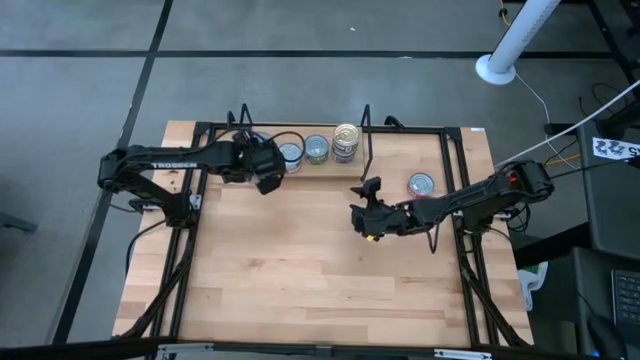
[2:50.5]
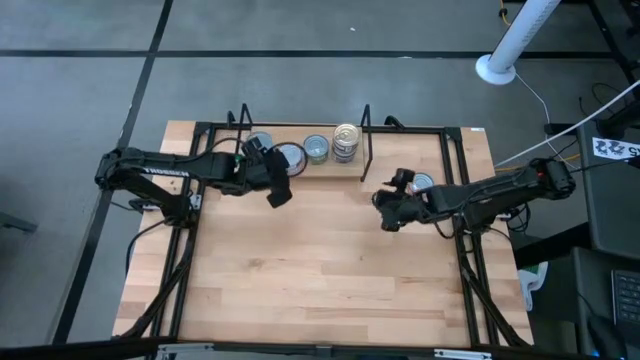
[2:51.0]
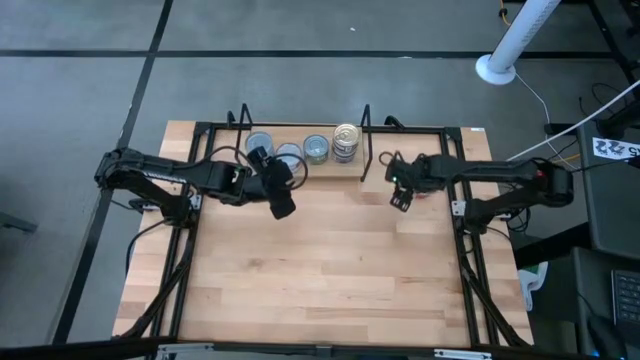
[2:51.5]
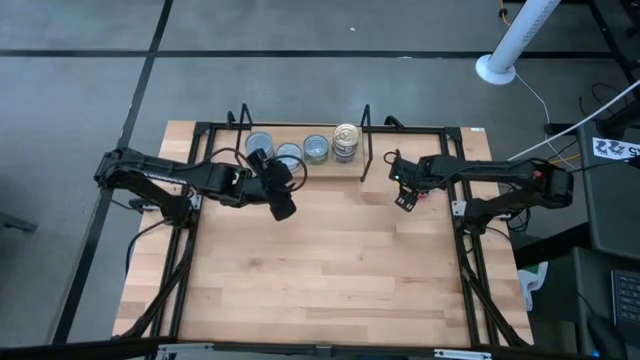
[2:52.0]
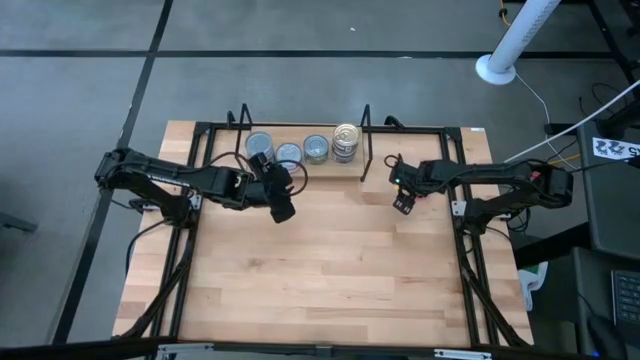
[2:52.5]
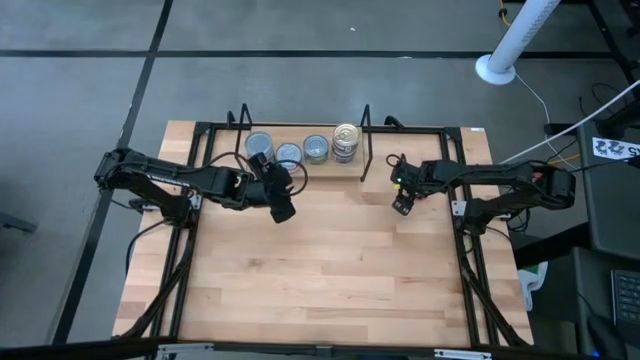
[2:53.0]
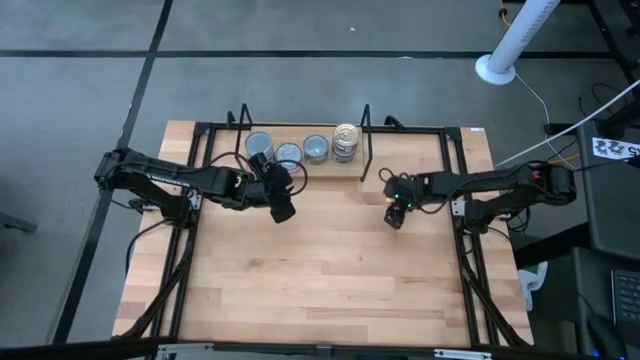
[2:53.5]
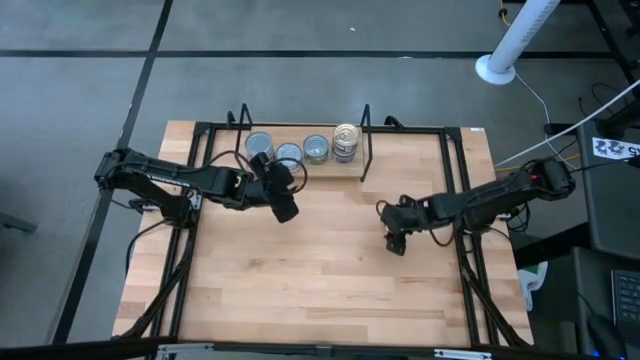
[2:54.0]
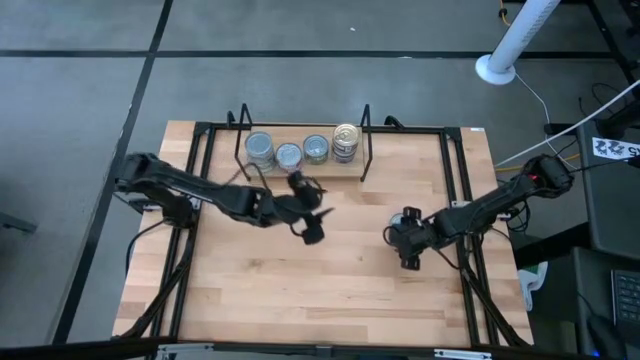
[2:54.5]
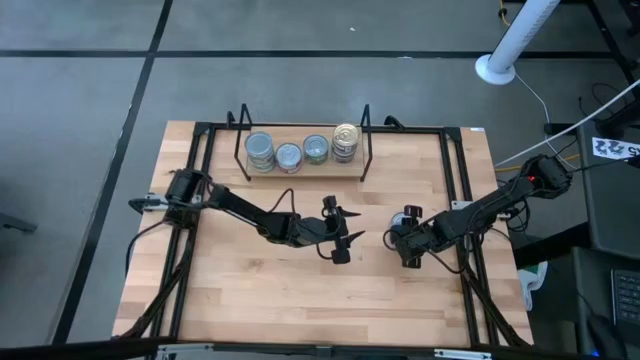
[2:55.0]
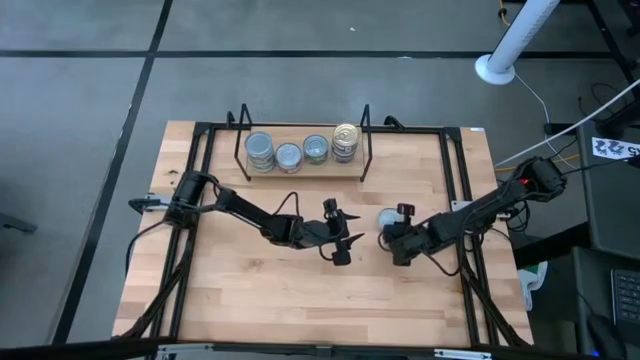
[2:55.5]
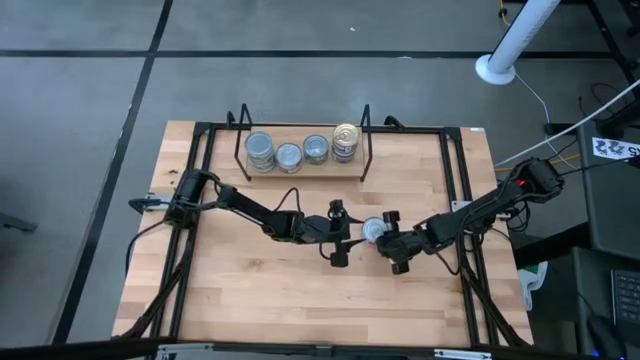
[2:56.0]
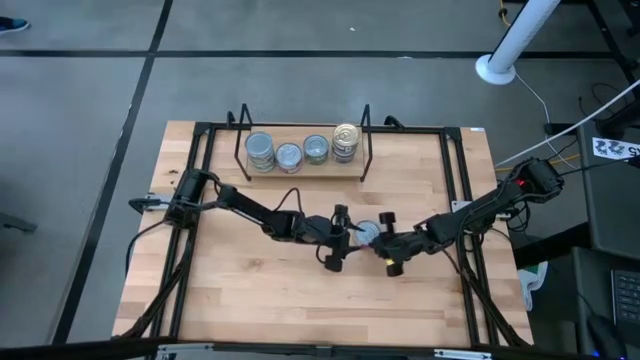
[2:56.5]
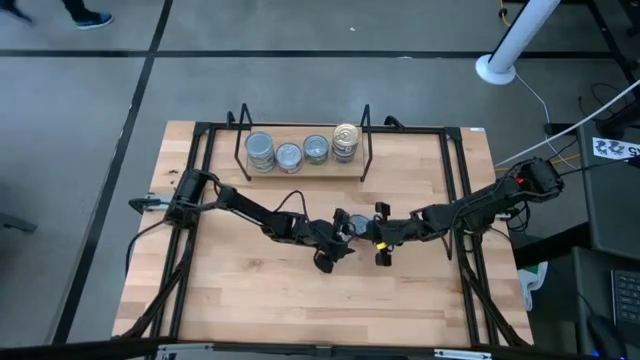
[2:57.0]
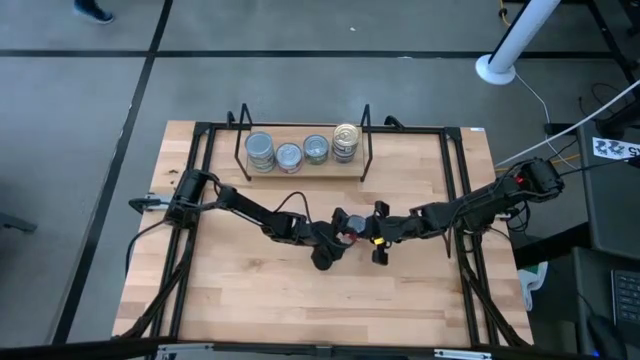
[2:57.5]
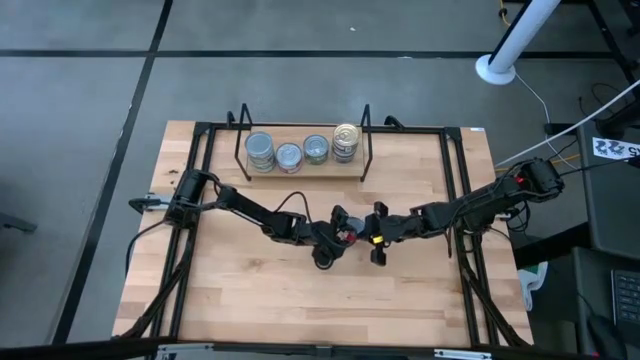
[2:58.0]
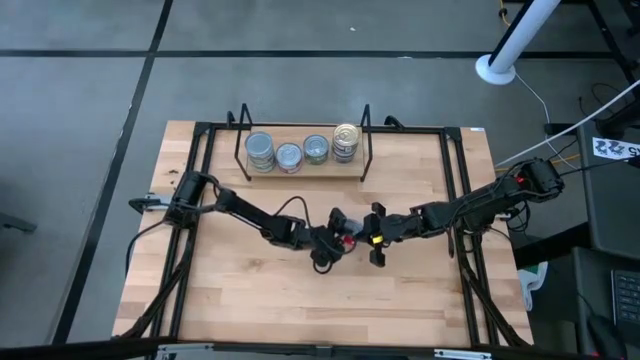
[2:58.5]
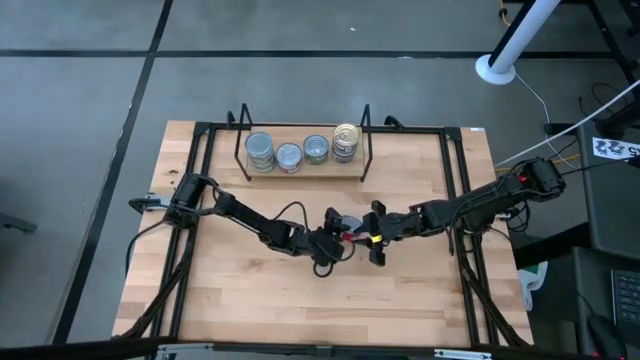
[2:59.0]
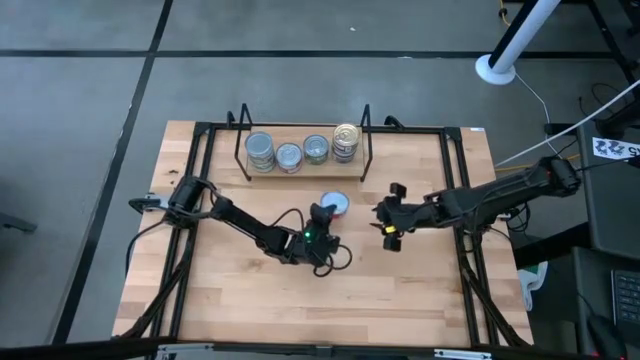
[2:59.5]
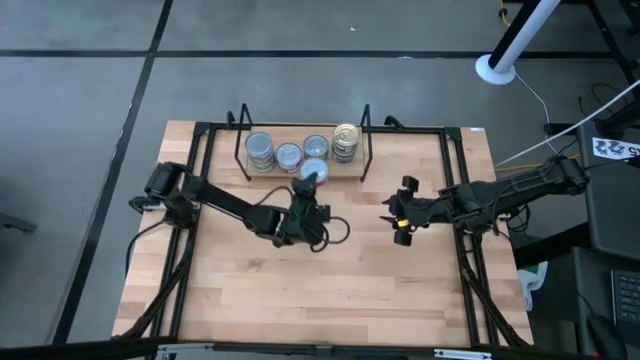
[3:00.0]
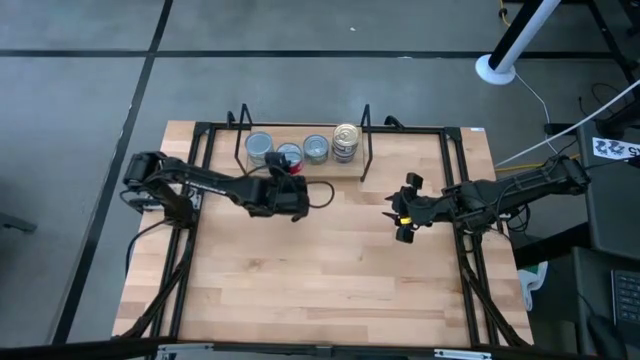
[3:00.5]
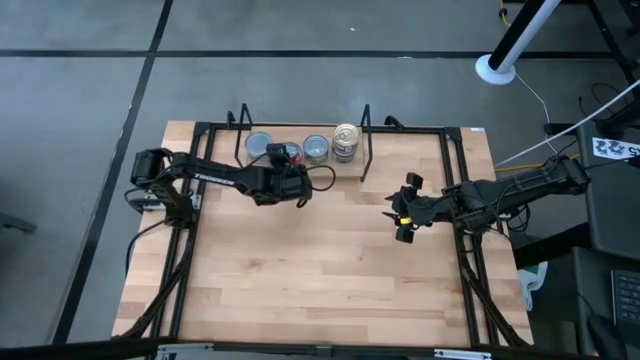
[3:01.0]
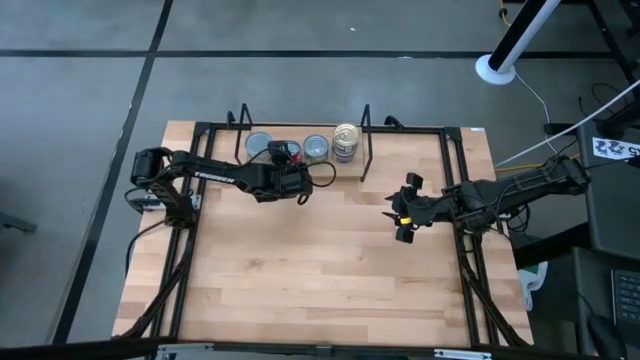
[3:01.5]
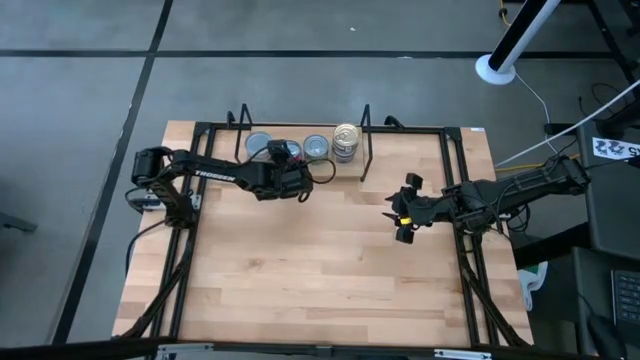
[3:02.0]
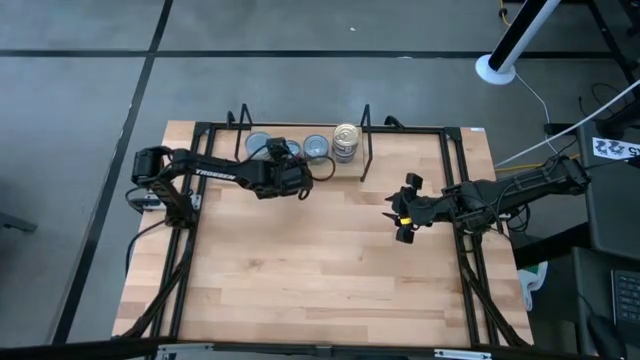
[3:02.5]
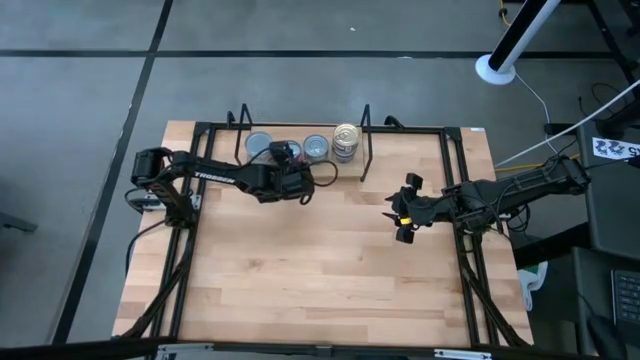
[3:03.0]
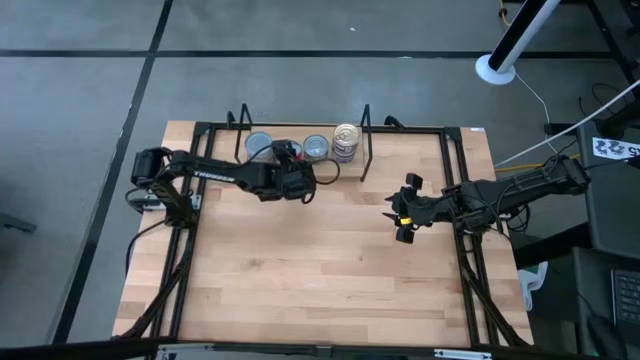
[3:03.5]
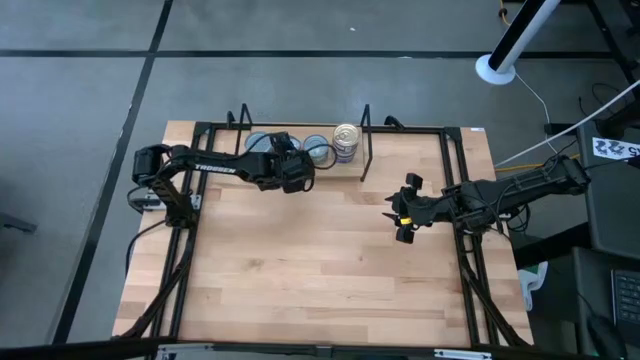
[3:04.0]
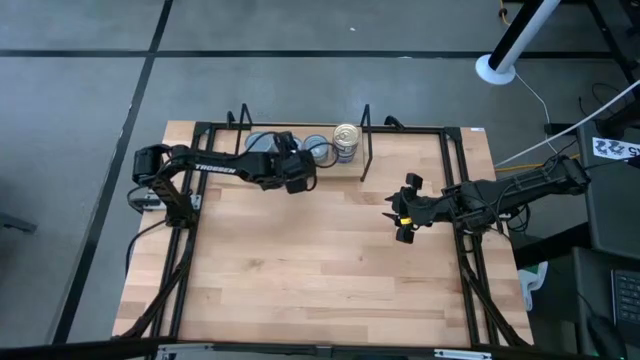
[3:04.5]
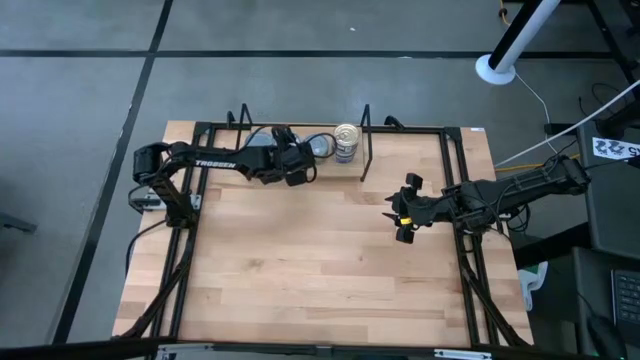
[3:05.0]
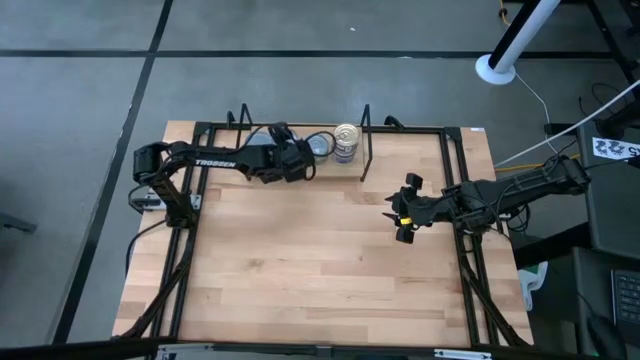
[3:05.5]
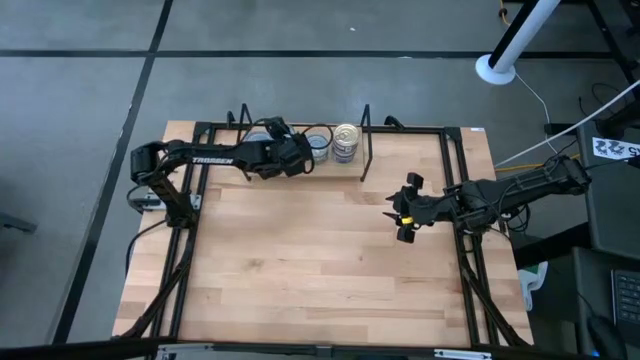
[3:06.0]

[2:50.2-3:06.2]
Task: Stack canned seafood by type on shelf
Stack the red tuna can on top of the red tuna can on the shelf

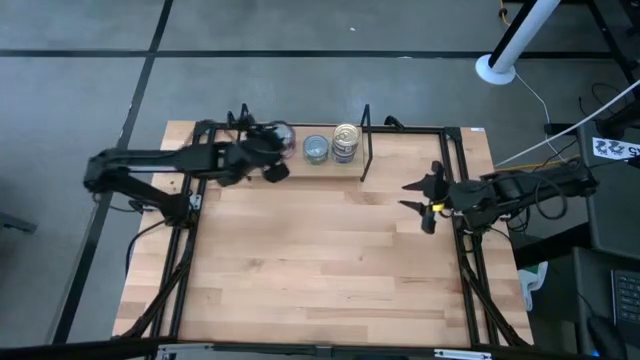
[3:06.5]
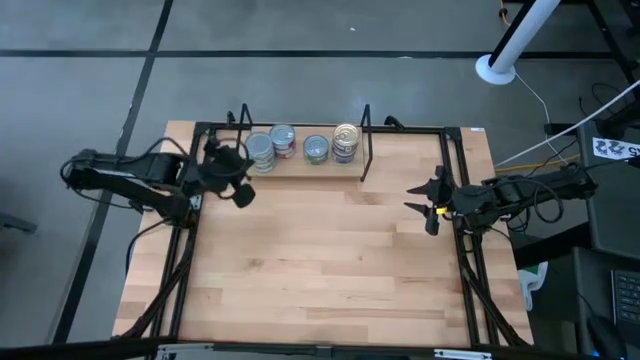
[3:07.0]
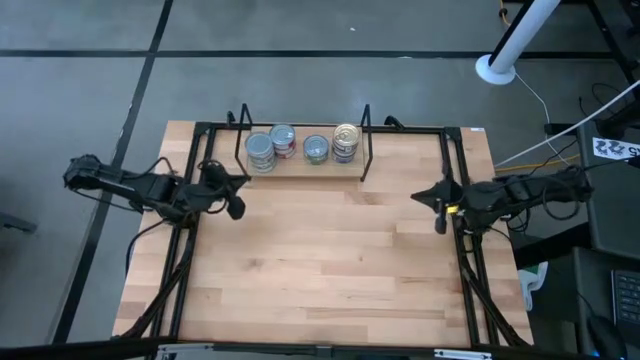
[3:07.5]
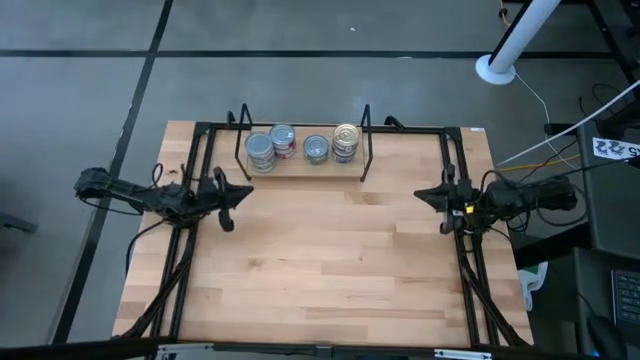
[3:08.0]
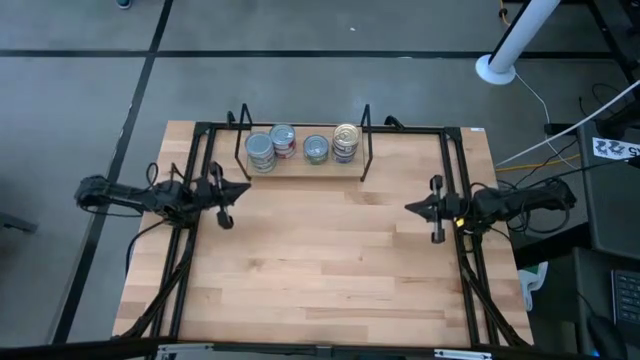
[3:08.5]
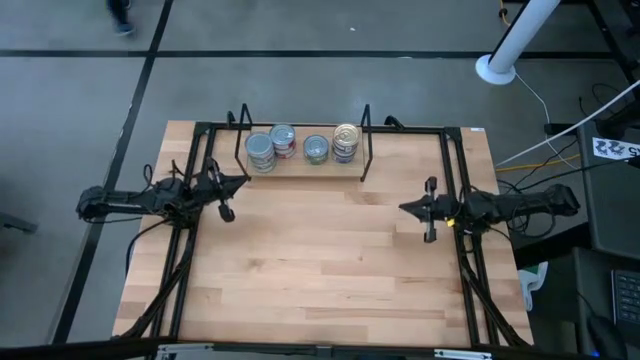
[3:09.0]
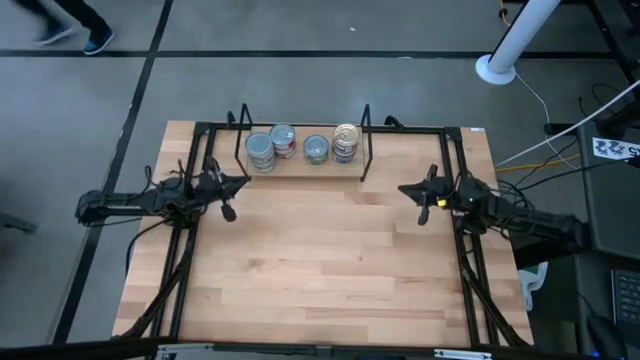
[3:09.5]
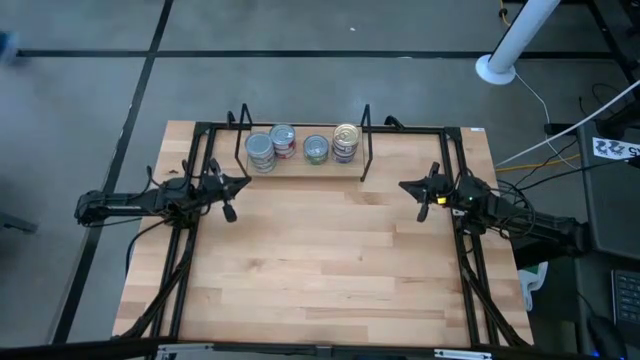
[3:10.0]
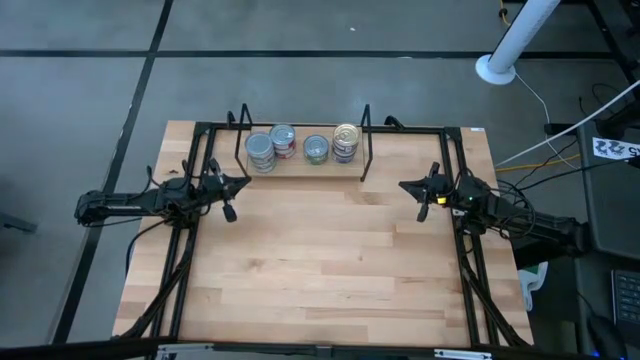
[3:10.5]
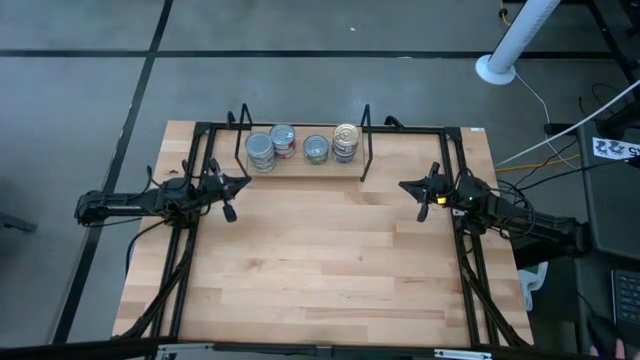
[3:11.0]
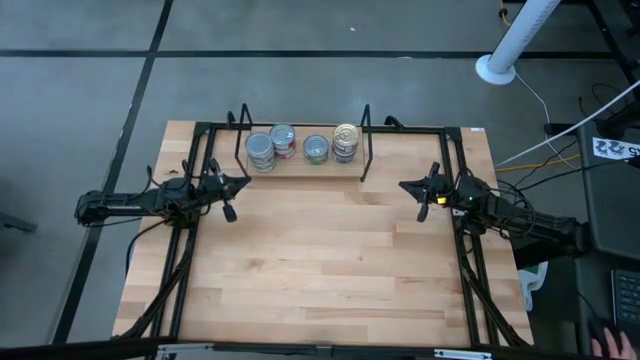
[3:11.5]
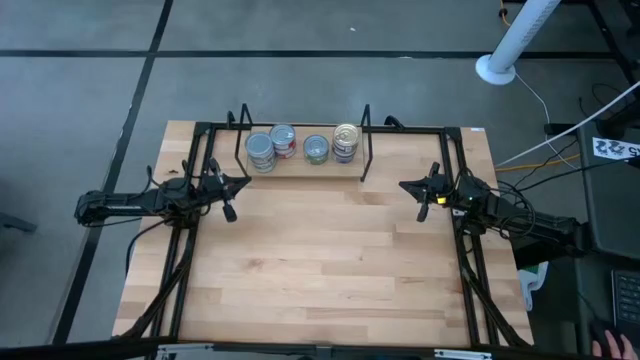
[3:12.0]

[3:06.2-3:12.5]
Return to Home Position

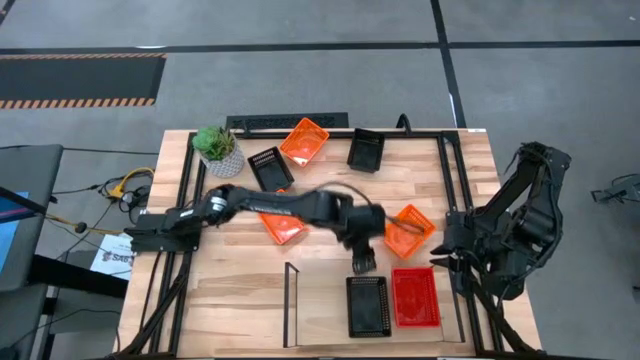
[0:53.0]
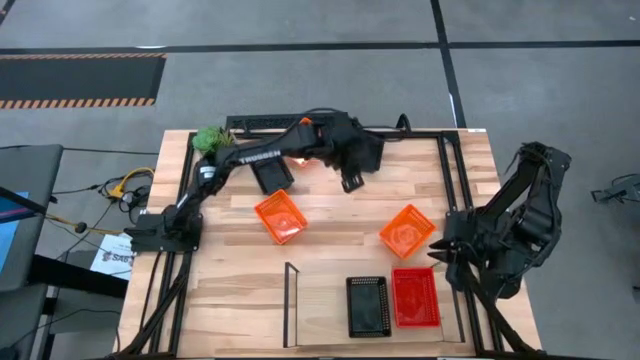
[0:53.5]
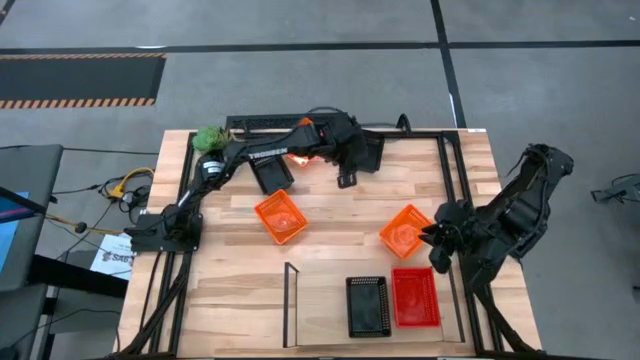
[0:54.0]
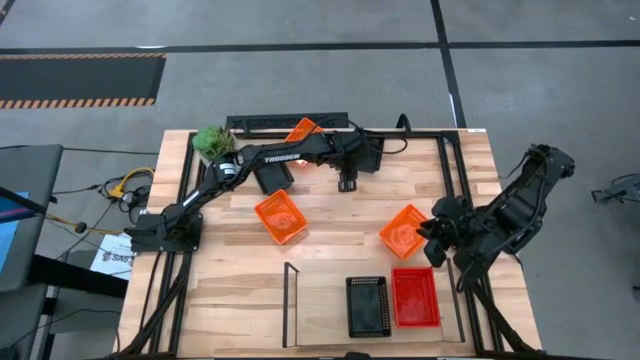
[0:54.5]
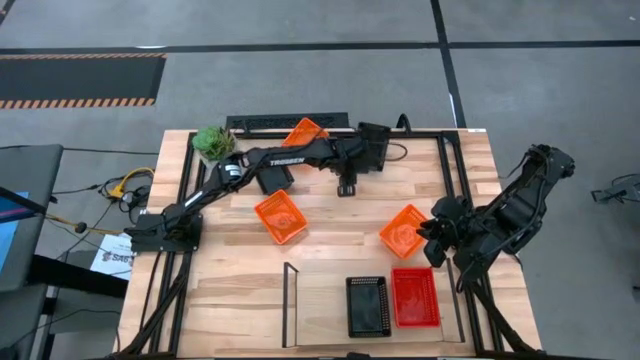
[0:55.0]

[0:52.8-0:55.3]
Task: Stack baskets on shelf by color
Stack the right black bin on top of the black bin on the shelf
